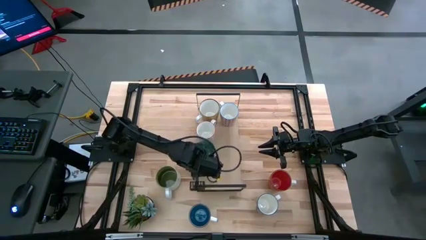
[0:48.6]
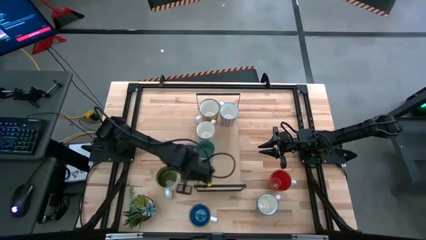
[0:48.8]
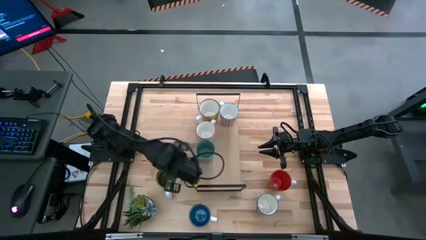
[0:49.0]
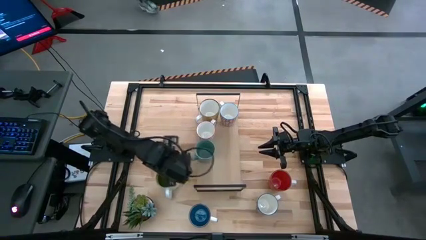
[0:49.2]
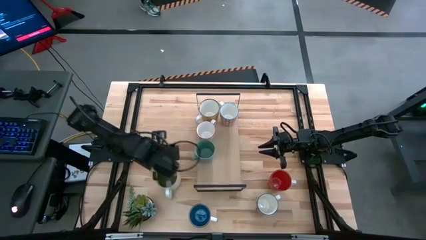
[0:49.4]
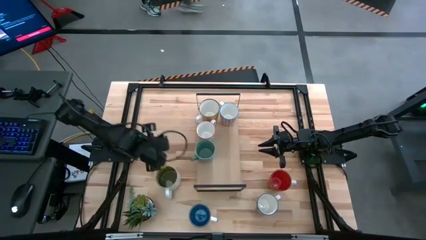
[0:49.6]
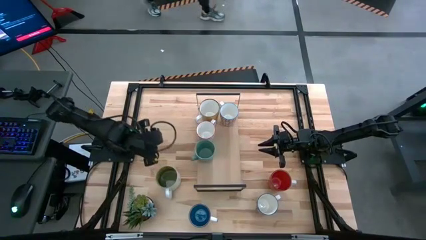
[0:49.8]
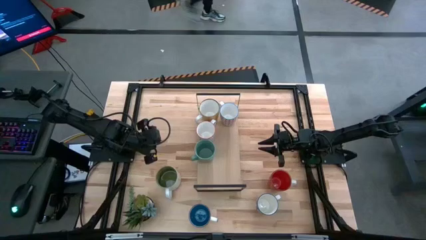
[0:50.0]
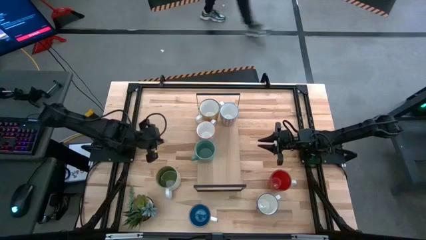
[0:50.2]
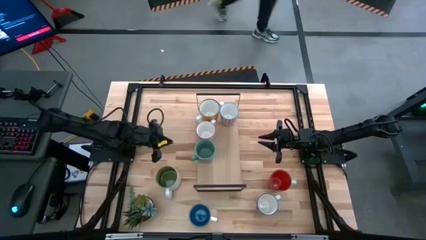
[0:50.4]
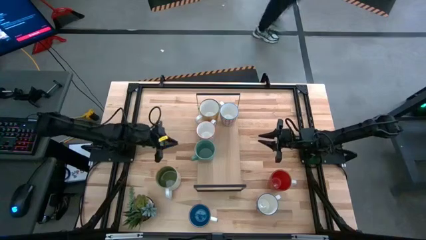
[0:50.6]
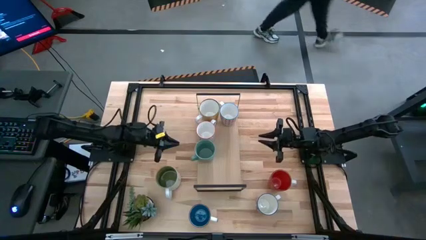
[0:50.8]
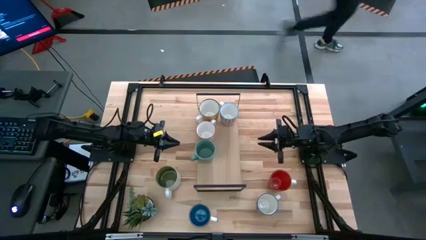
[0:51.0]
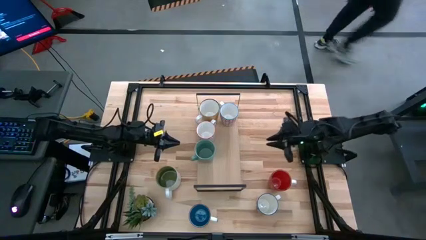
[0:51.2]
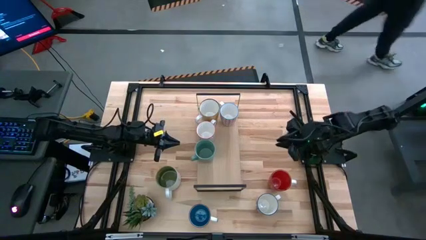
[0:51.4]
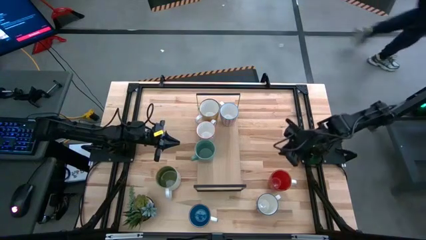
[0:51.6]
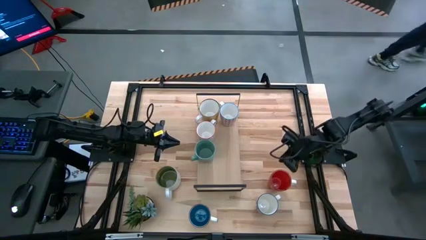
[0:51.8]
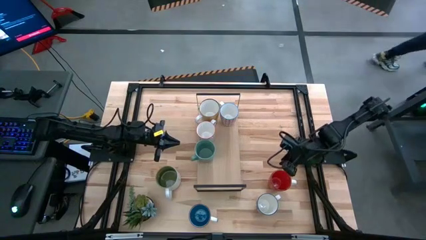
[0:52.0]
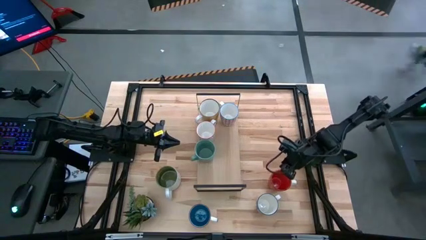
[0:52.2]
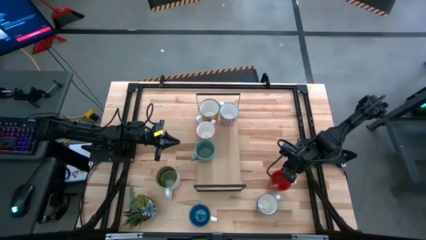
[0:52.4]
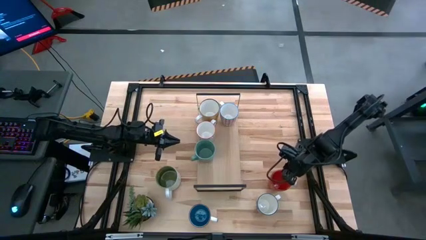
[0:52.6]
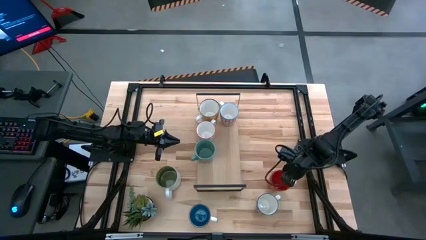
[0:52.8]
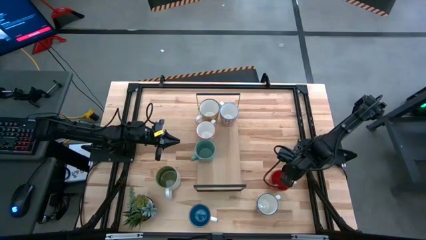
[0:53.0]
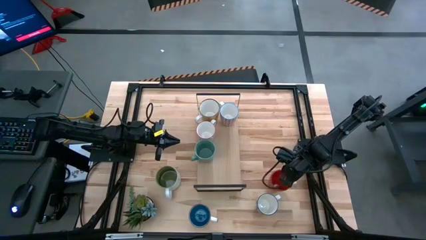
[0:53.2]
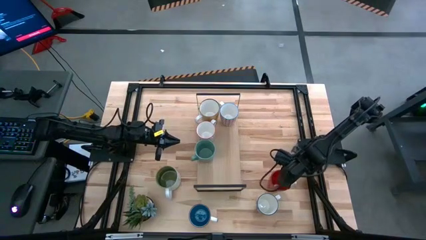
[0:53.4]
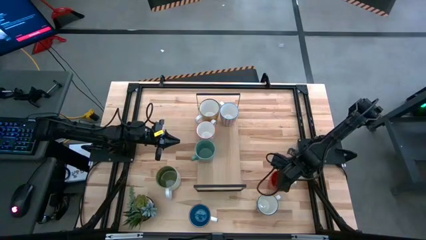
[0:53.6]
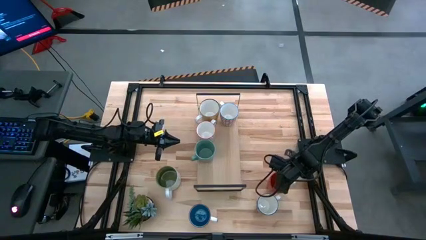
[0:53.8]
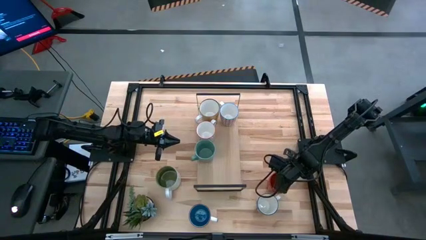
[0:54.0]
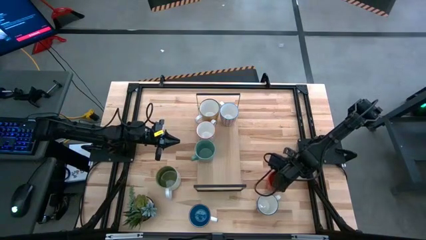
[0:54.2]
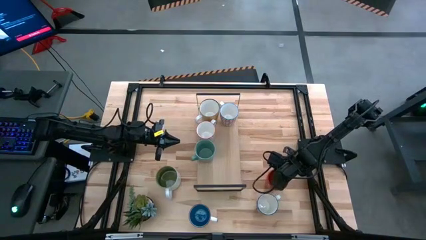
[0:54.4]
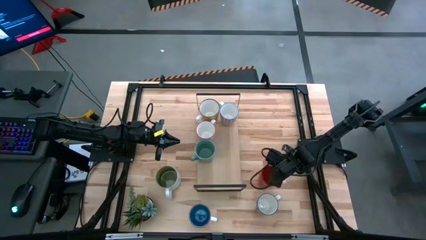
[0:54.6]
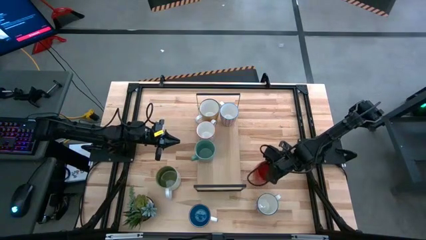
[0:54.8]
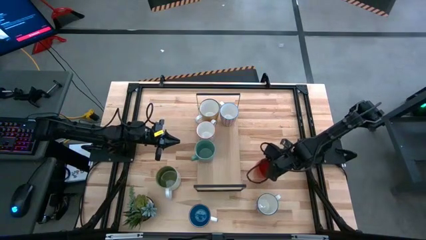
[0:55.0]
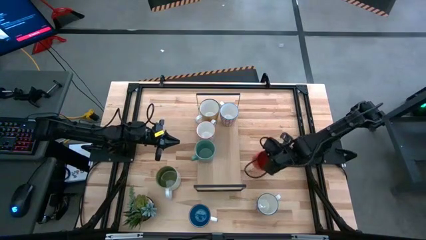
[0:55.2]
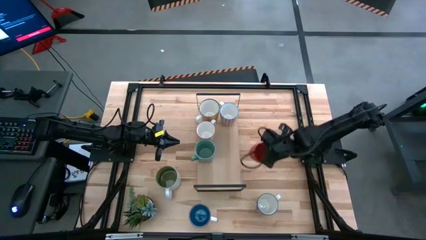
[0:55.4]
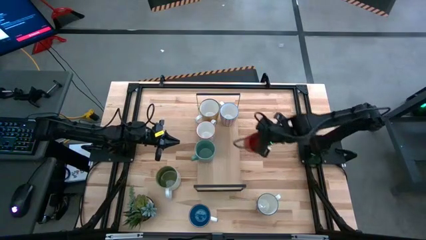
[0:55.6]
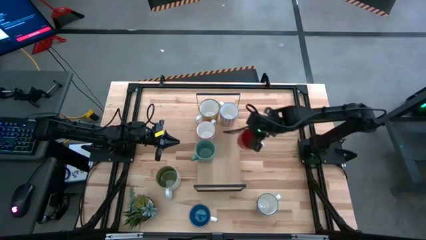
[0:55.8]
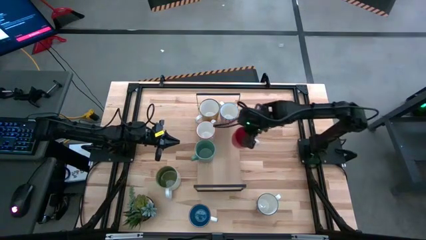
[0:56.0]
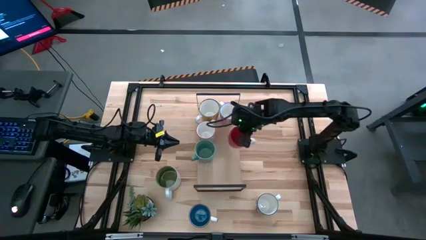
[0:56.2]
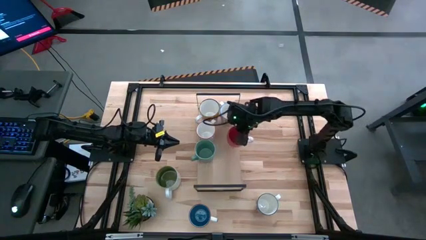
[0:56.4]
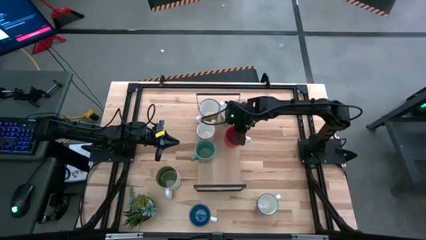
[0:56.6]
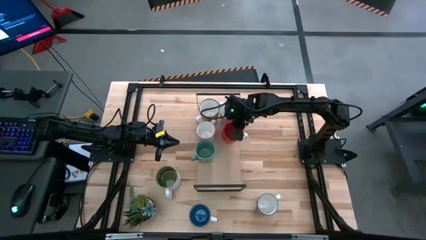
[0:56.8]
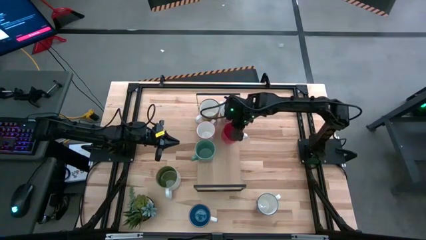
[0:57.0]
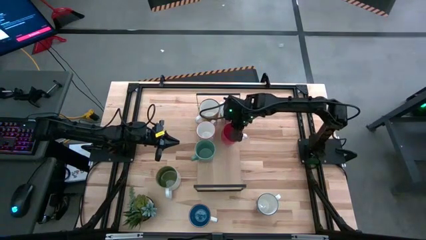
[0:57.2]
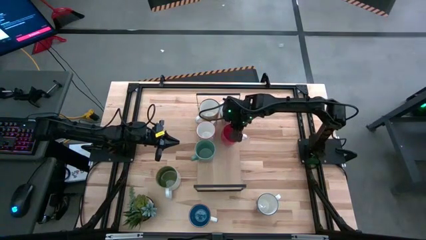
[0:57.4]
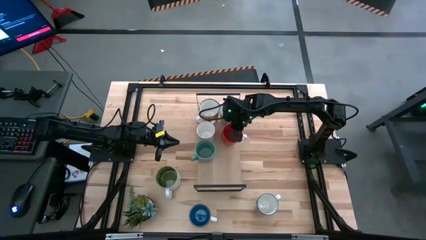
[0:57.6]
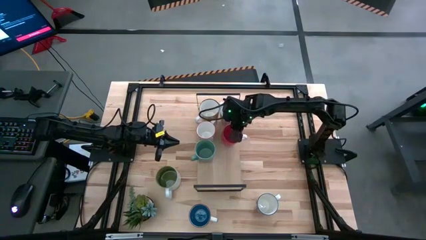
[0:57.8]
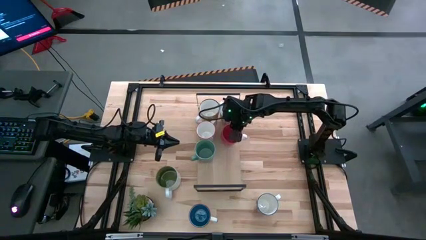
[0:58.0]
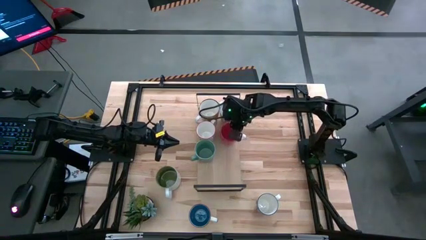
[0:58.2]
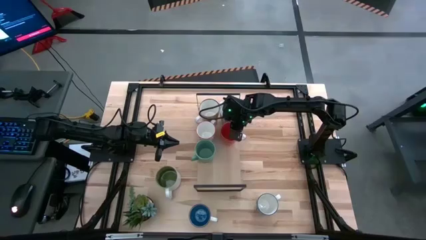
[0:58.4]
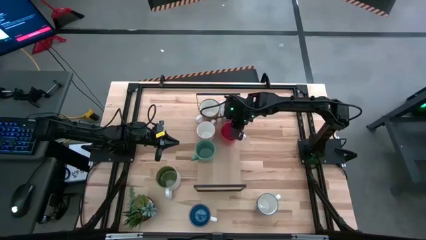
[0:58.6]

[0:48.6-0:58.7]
Task: Place coffee mugs
Put the orange mug on the shelf

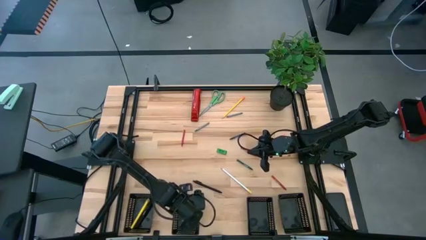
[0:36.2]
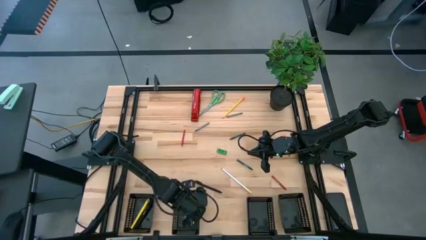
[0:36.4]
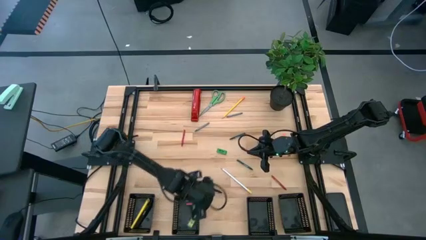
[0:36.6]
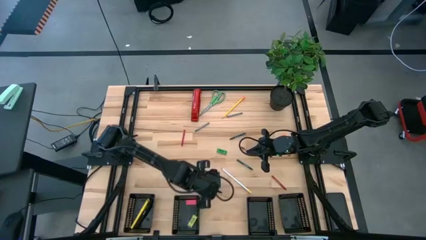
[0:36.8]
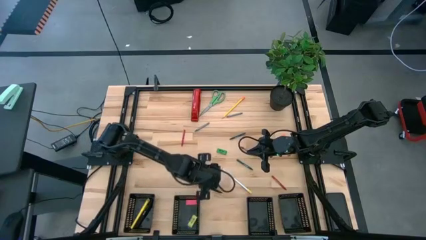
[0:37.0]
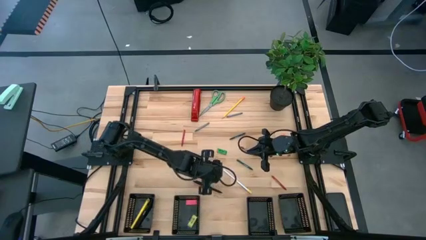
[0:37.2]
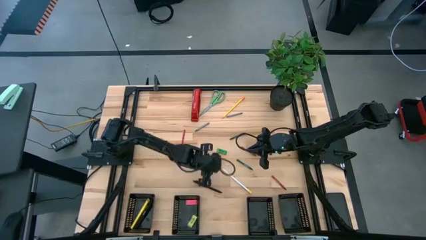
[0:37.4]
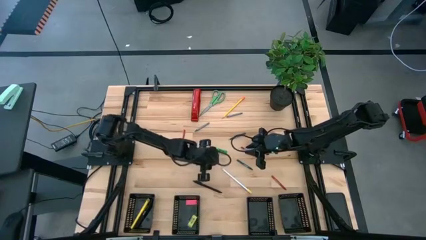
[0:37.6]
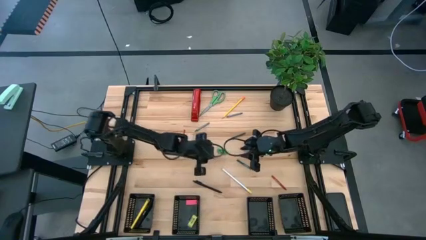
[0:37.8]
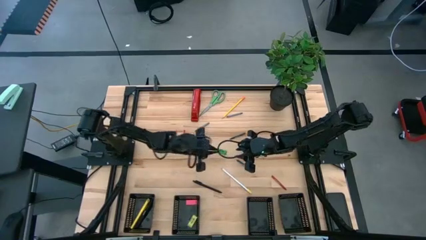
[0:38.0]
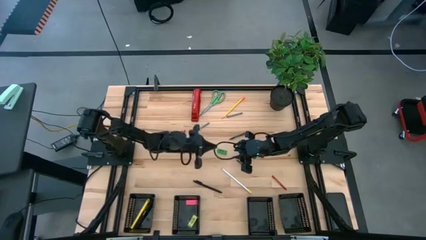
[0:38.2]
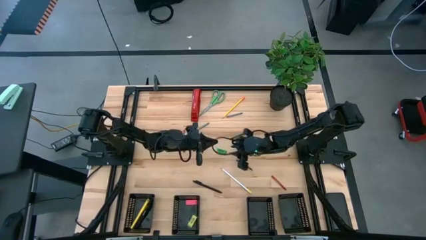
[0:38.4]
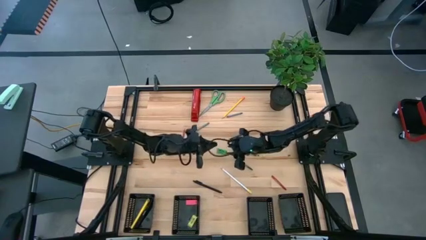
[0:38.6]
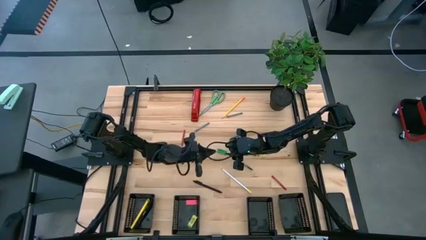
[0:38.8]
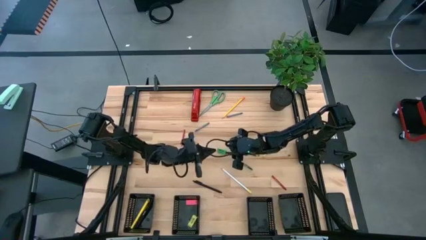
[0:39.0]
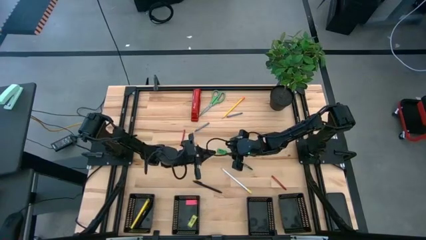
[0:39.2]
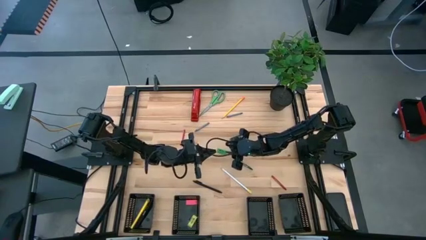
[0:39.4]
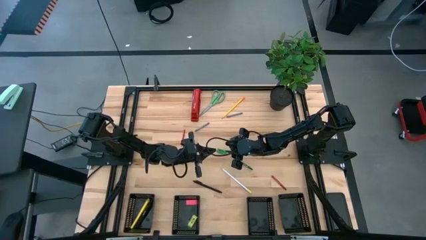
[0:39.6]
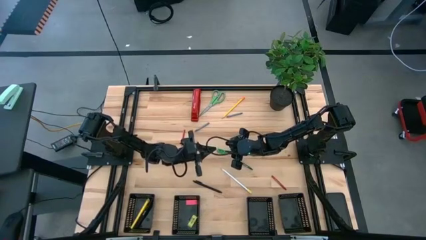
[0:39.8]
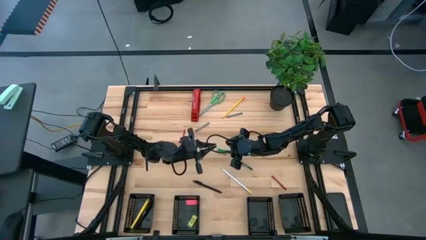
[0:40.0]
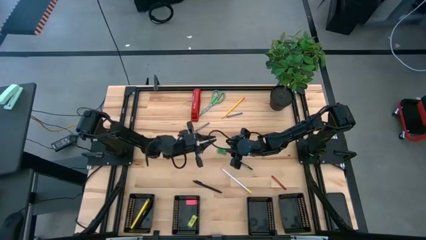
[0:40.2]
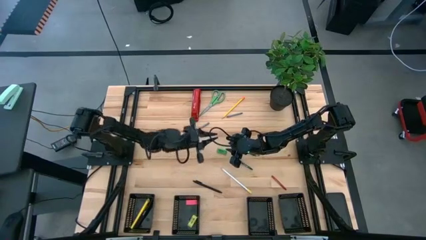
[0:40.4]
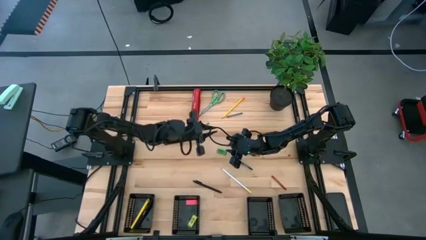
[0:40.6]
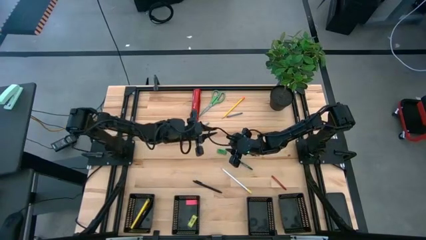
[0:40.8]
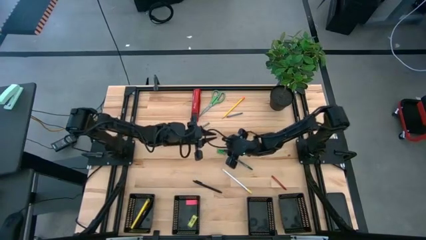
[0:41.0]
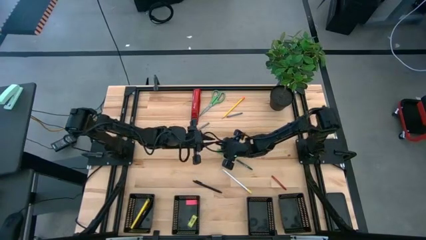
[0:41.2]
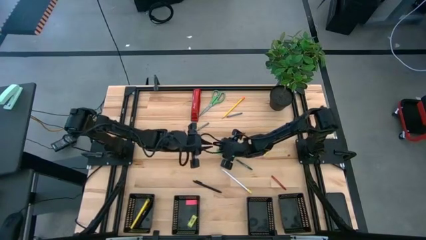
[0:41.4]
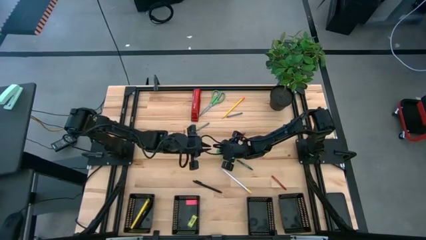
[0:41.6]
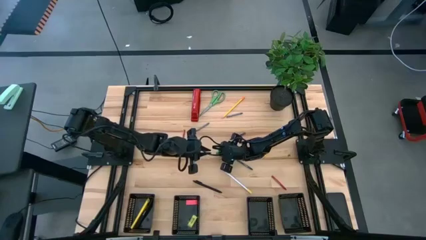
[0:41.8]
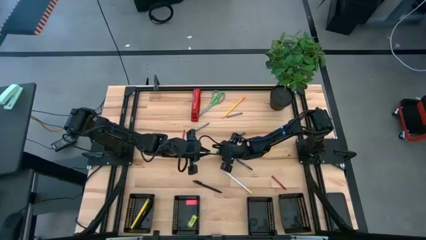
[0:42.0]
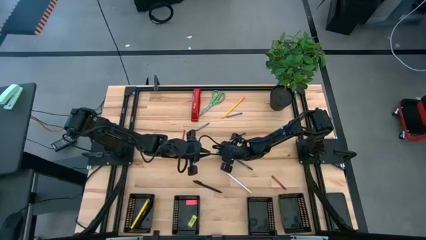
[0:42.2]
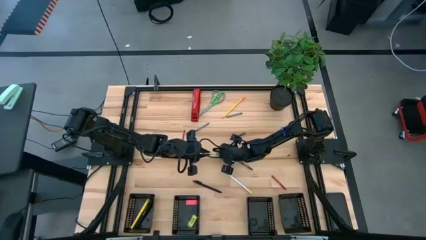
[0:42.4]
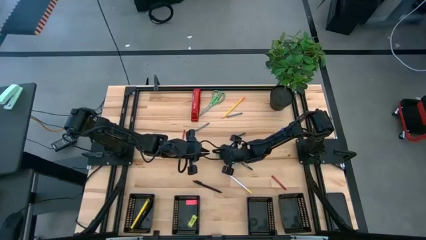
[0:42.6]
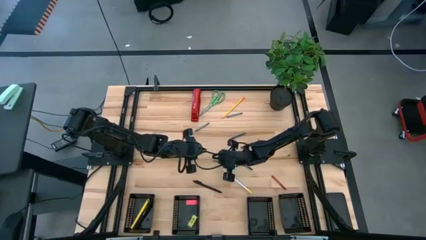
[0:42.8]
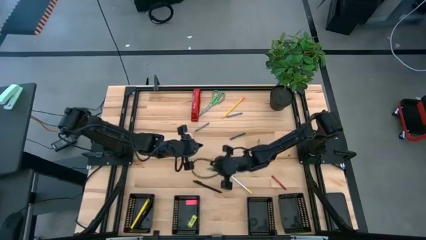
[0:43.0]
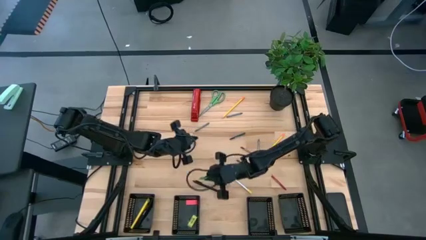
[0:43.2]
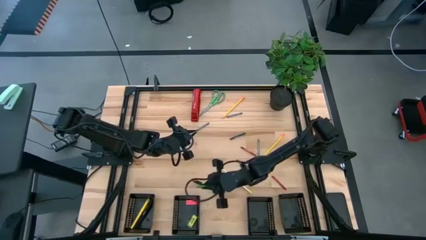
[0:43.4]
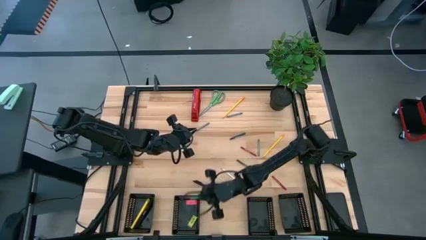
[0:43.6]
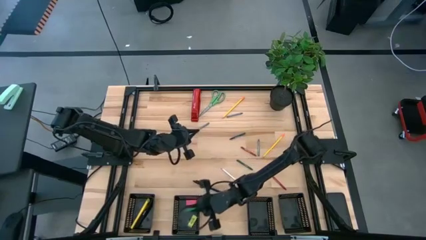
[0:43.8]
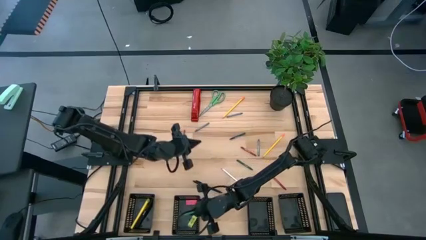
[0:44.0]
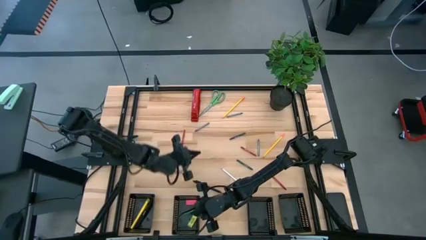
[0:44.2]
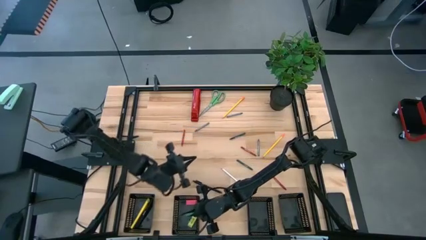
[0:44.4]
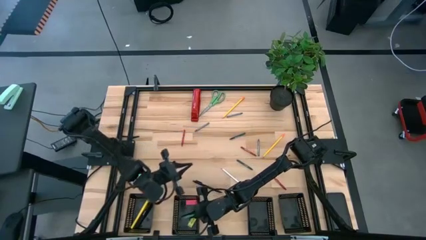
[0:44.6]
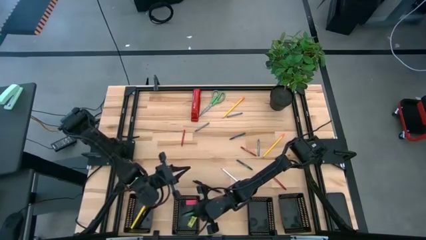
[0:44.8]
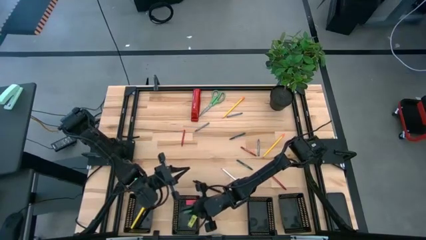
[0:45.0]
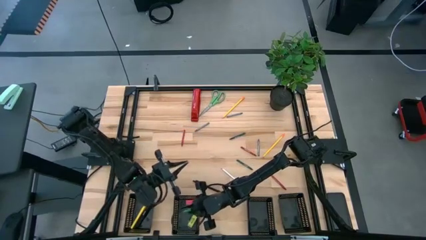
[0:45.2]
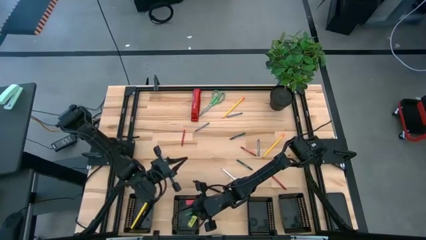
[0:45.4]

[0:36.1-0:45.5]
Task: Sort crayons/erasers/pens/pencils in bins
Put the green eraser into the middle left black bin
